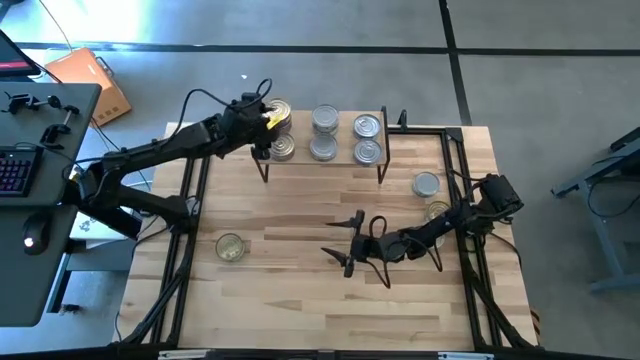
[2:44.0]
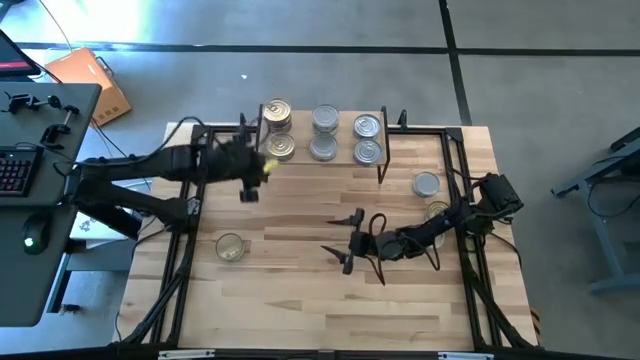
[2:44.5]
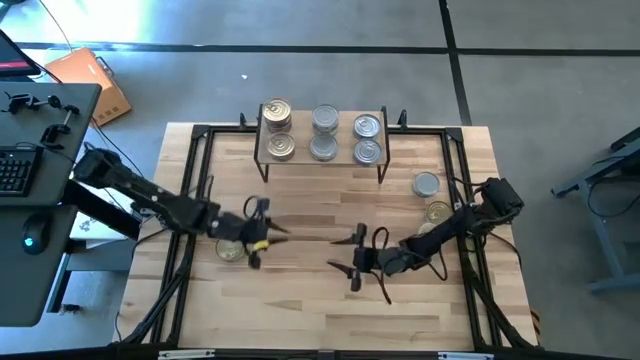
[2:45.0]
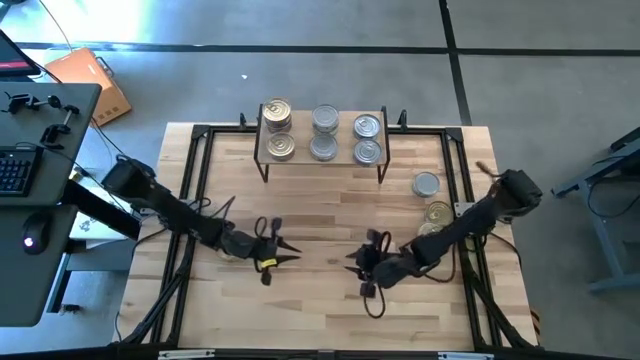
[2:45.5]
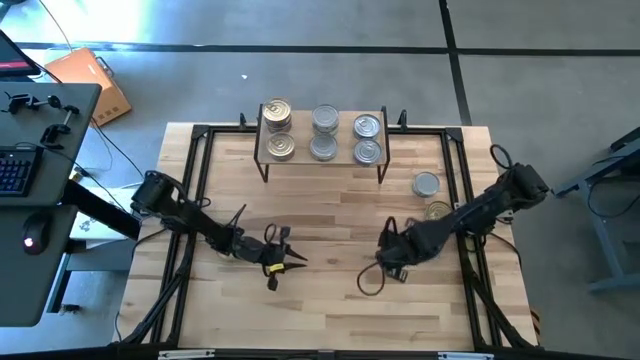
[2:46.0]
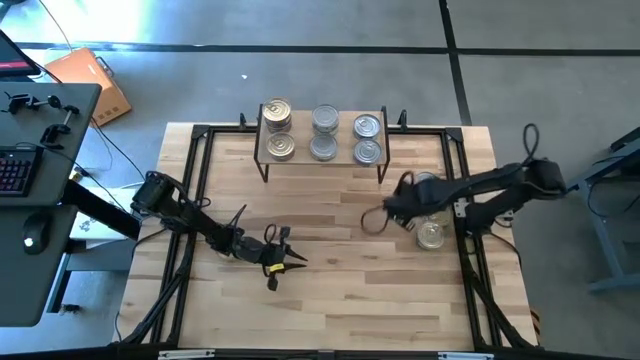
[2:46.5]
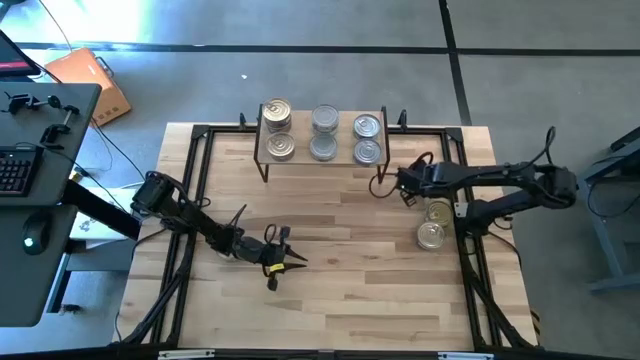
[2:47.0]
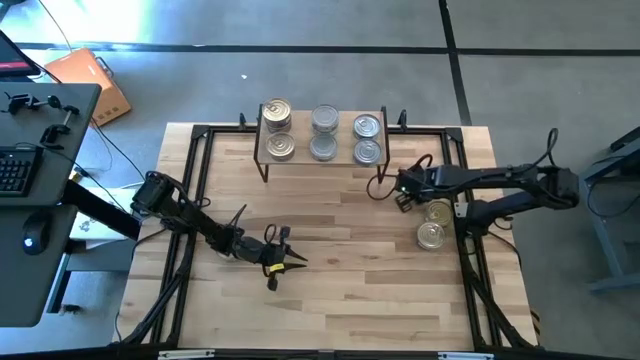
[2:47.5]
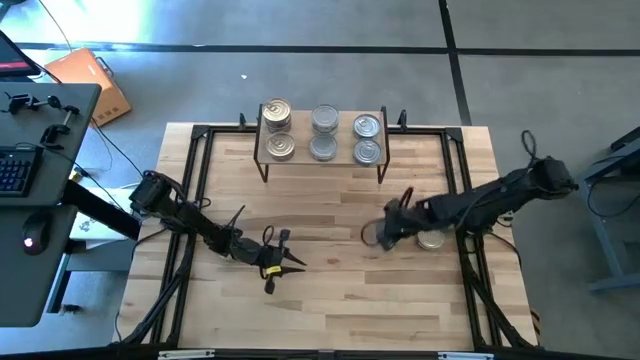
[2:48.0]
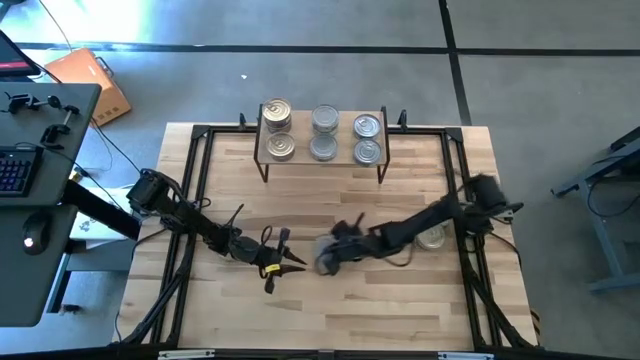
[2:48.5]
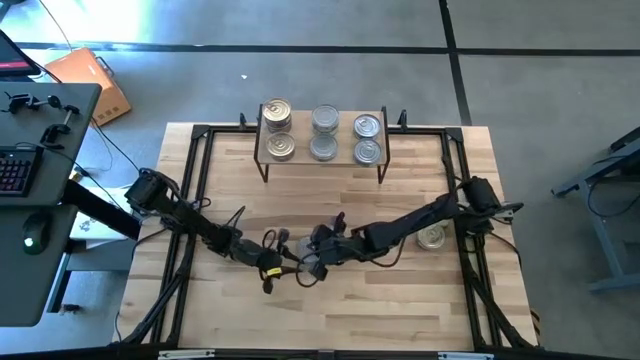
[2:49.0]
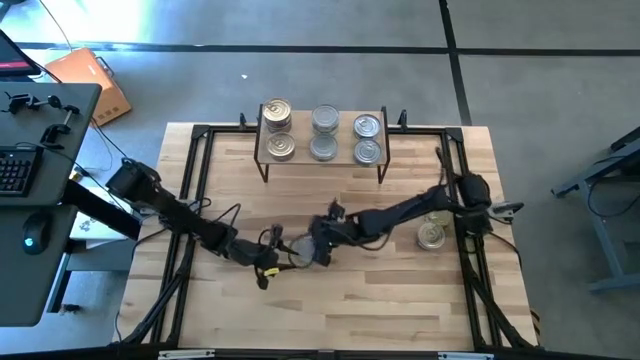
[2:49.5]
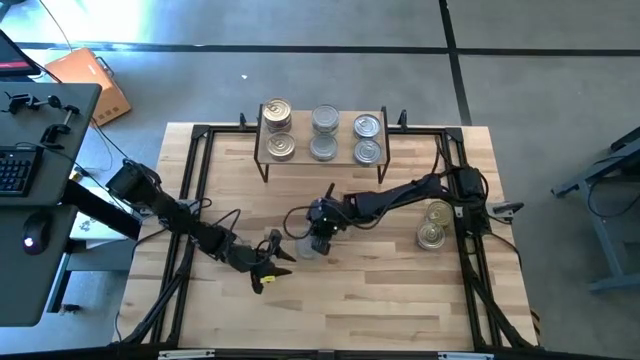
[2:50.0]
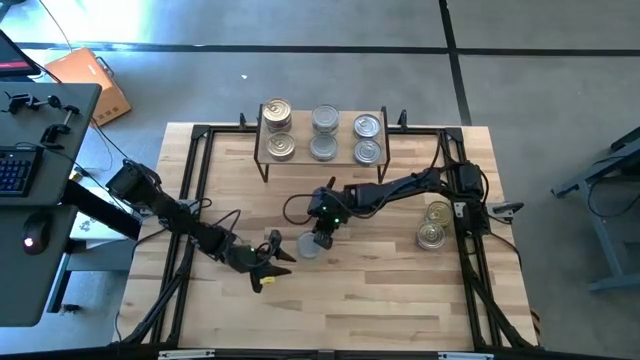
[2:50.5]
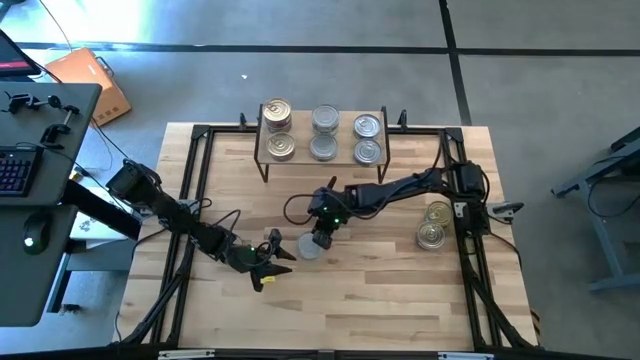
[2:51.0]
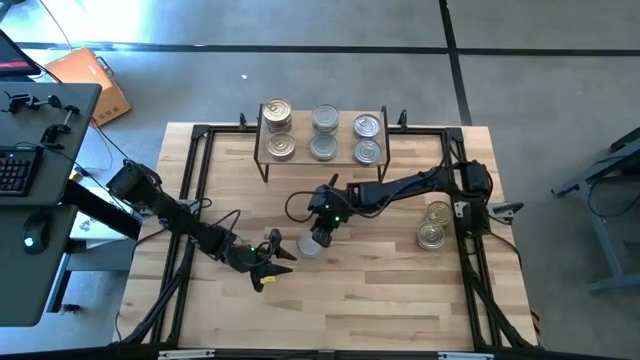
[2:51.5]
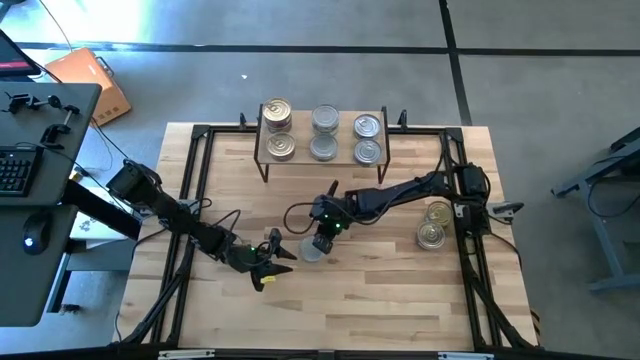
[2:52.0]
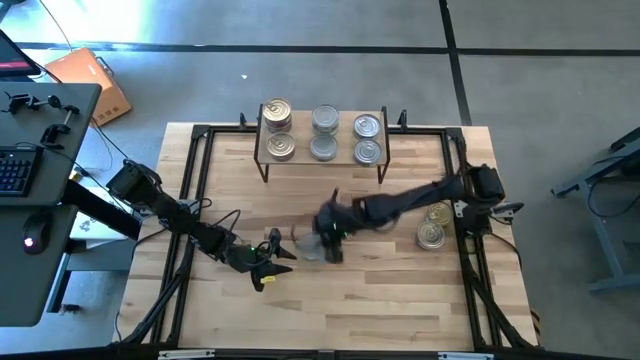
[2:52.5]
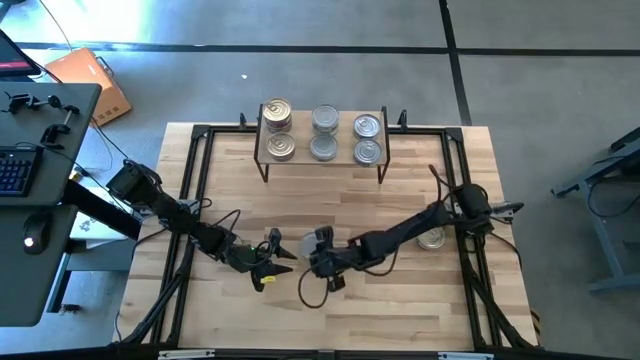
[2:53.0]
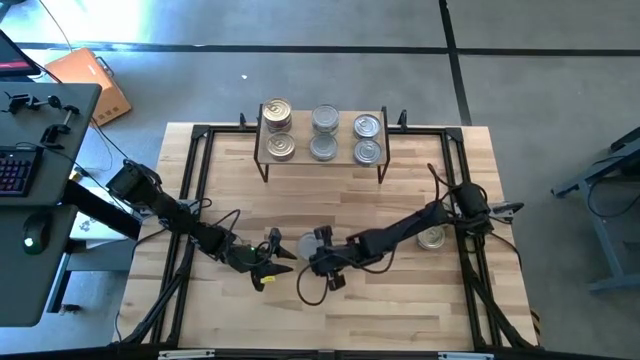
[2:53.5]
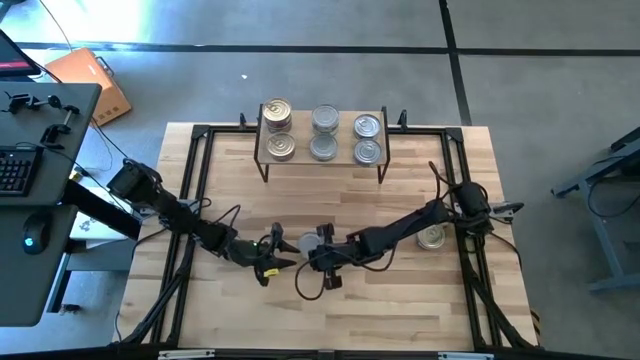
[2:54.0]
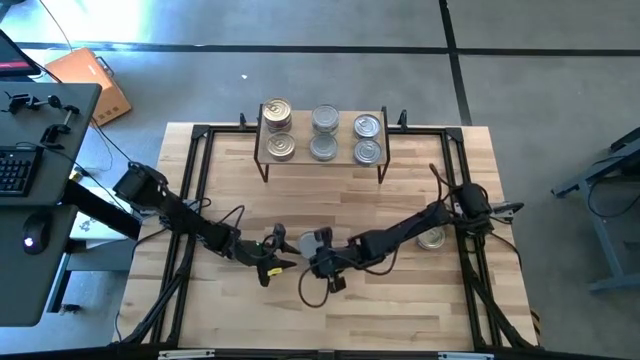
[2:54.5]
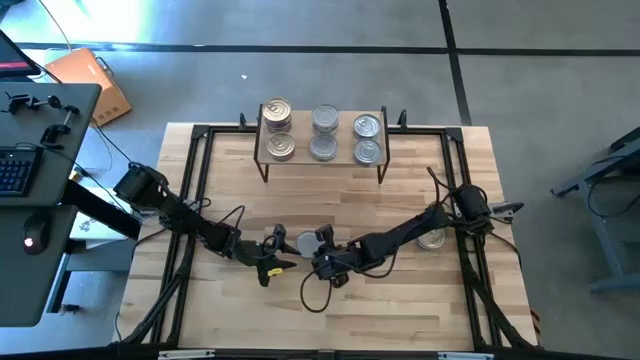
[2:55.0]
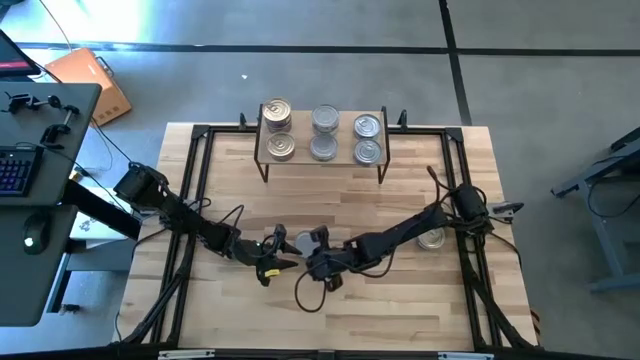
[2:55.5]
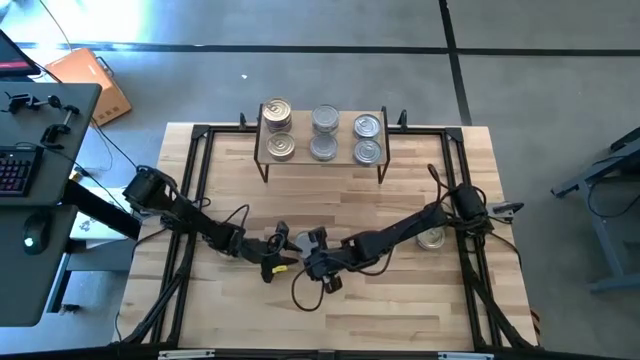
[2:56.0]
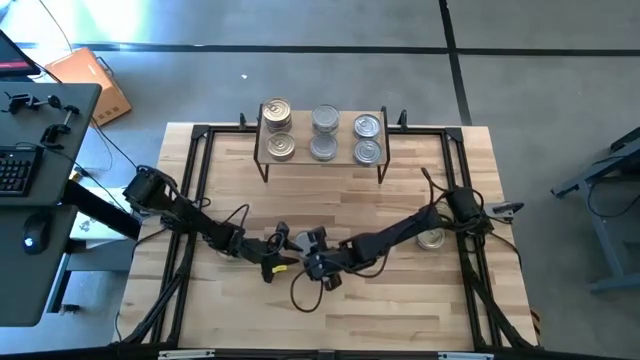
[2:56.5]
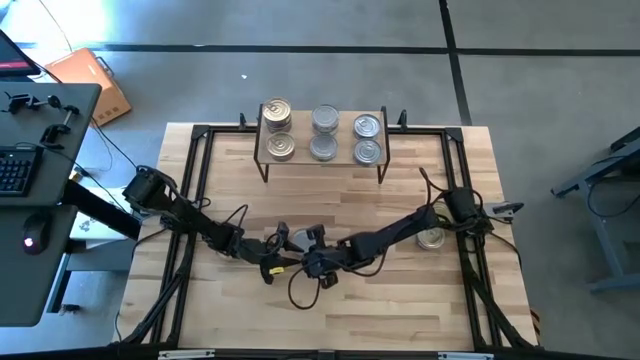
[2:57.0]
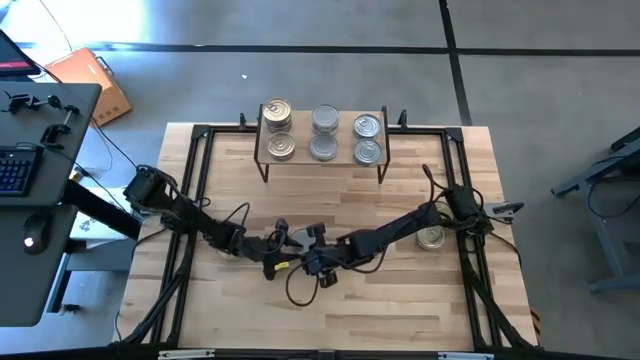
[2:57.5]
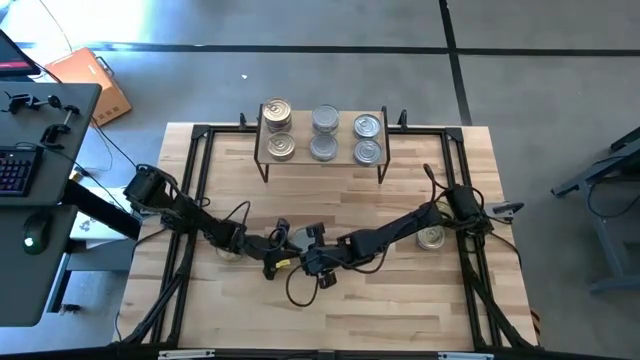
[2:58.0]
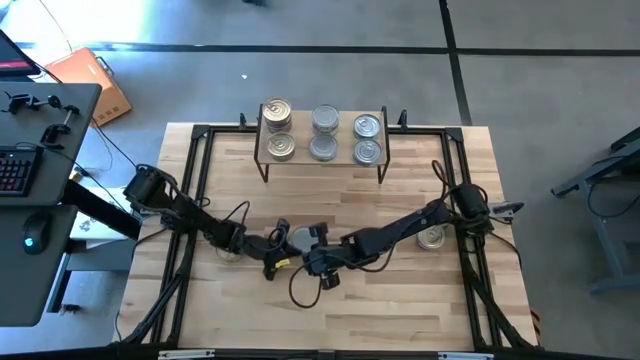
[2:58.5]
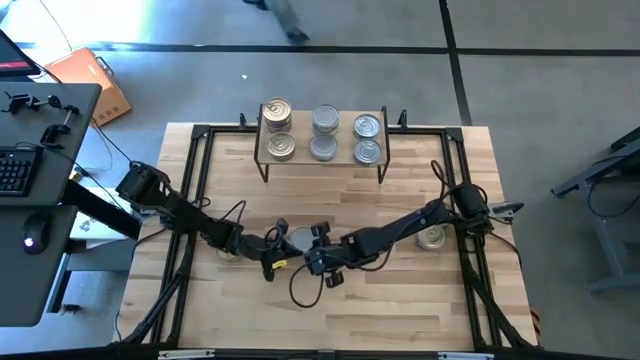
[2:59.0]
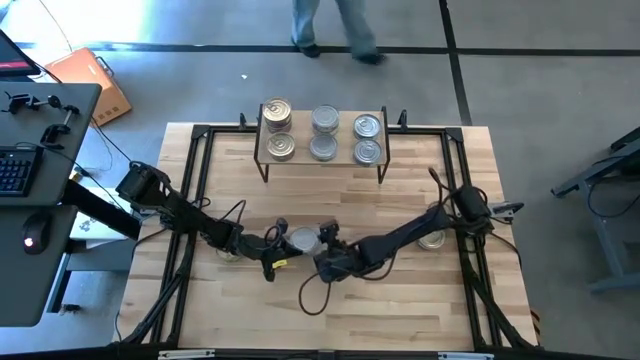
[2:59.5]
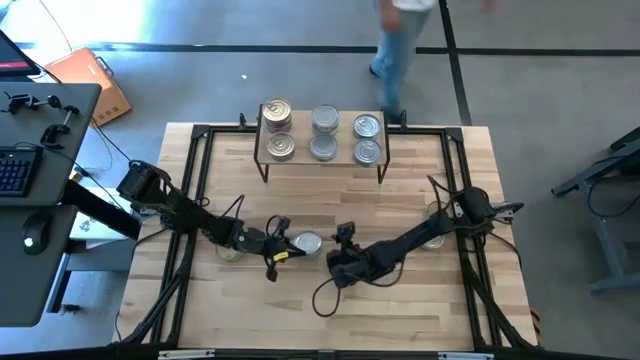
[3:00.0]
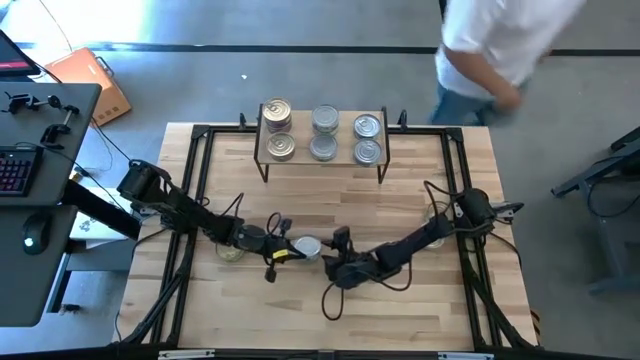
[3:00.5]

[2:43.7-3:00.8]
Task: Stack canned seafood by type on shelf
Stack the green and white tuna can on top of the green and white tuna can on the shelf

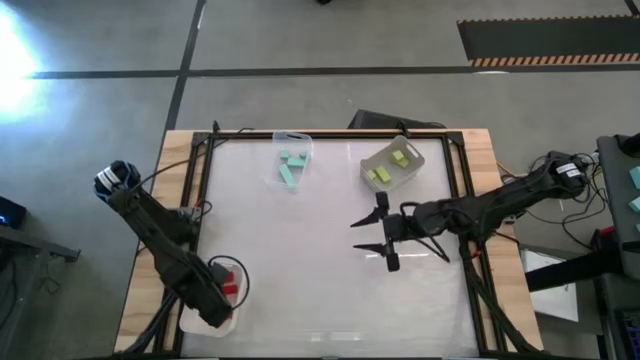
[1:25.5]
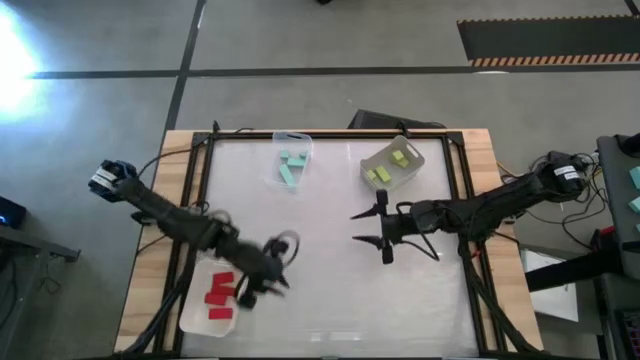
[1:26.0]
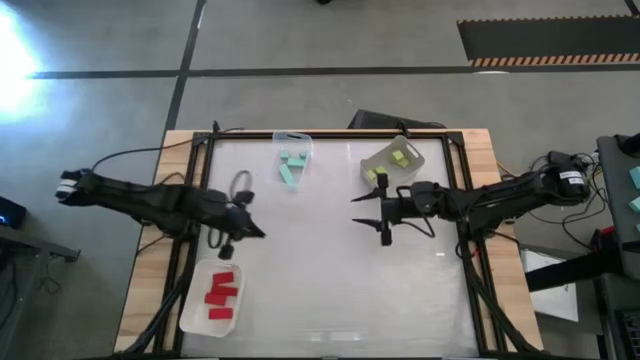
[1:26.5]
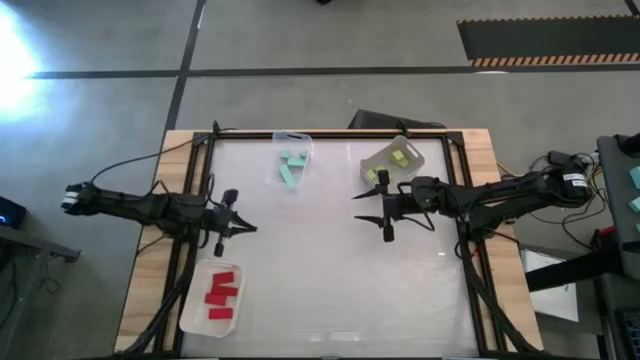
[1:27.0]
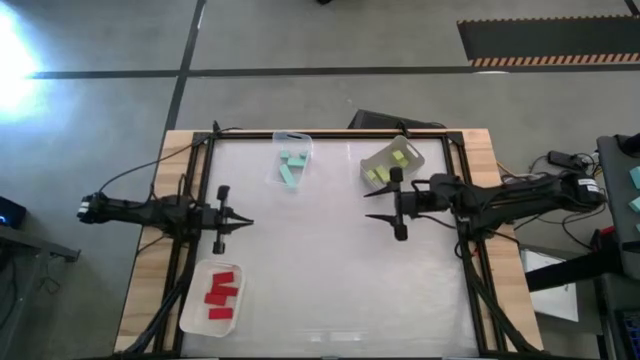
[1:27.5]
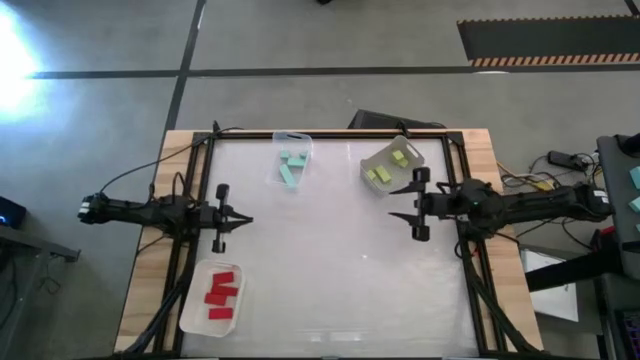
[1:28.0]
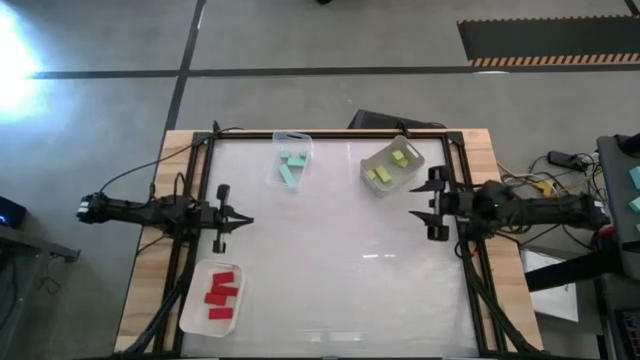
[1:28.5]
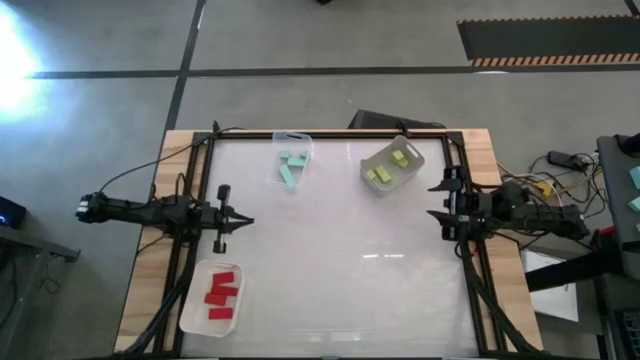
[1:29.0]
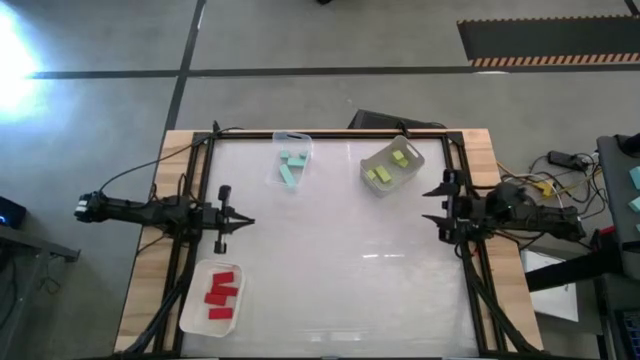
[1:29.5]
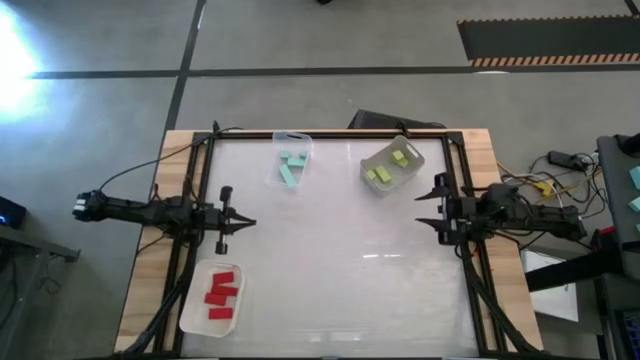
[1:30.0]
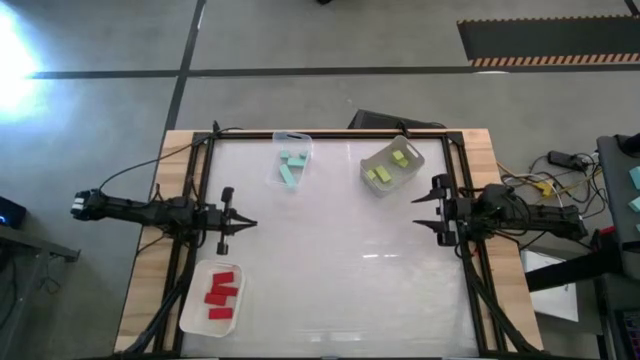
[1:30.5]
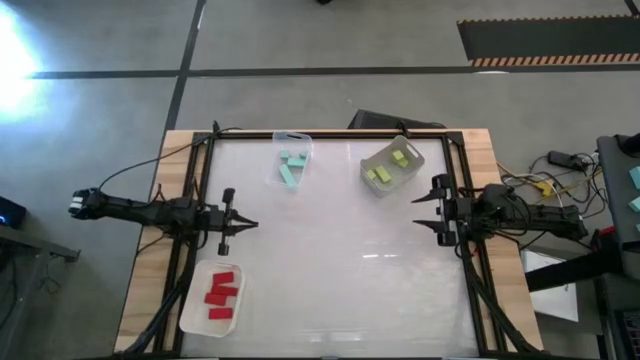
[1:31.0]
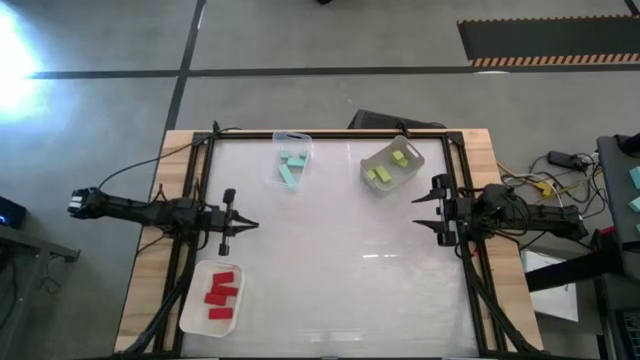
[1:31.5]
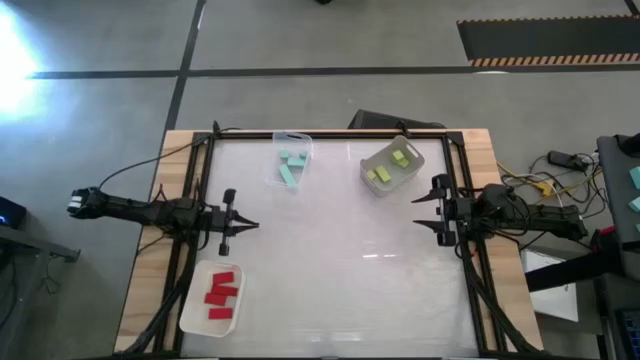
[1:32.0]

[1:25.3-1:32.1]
Task: Sort & place blocks by color
Return to Home Position
